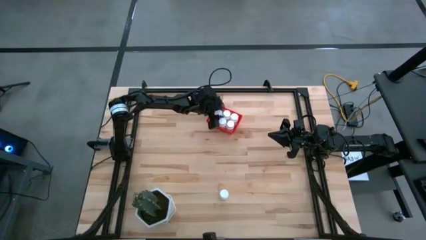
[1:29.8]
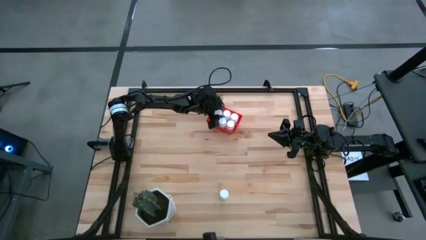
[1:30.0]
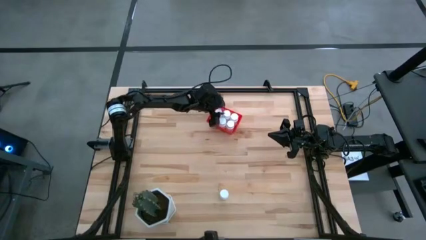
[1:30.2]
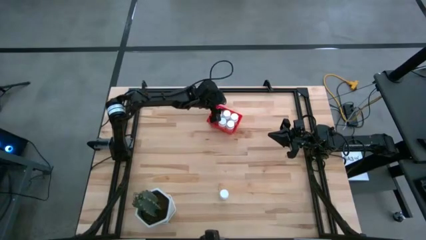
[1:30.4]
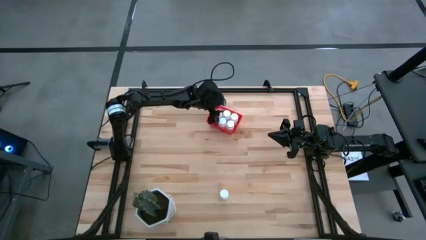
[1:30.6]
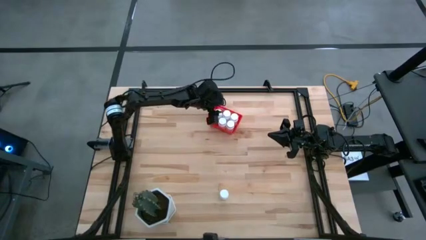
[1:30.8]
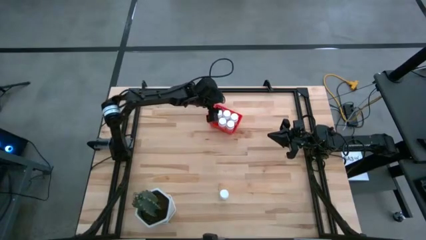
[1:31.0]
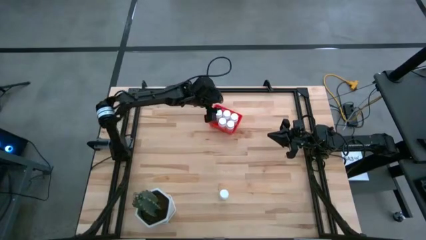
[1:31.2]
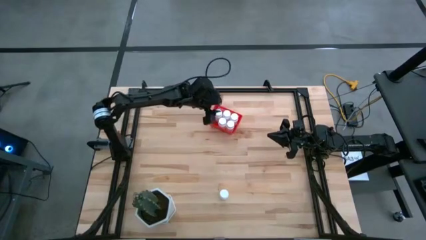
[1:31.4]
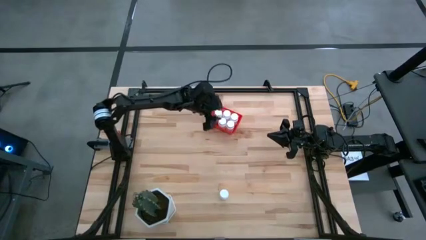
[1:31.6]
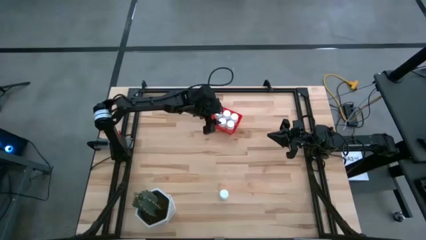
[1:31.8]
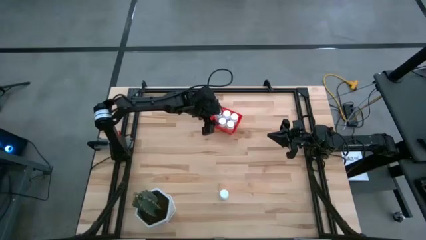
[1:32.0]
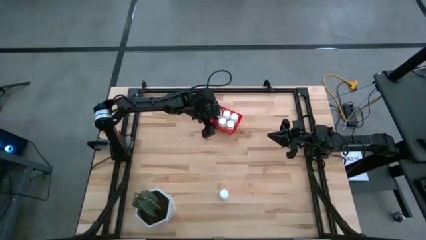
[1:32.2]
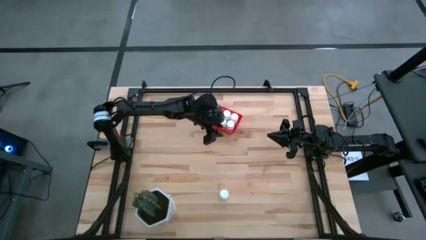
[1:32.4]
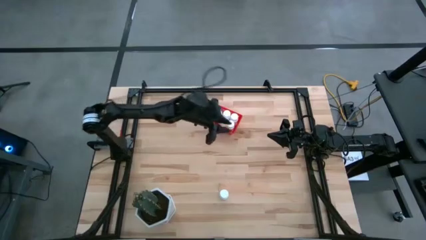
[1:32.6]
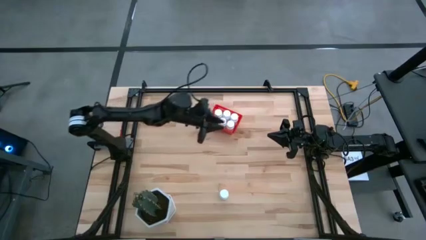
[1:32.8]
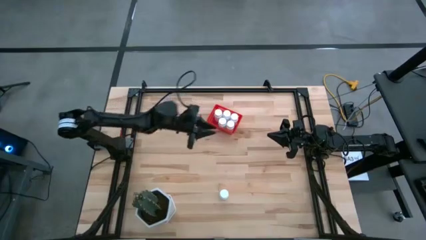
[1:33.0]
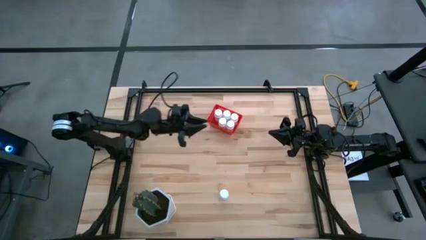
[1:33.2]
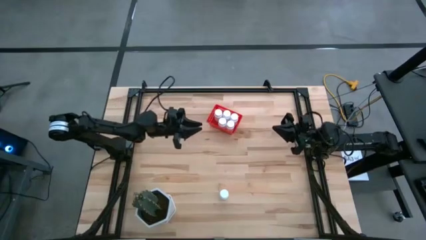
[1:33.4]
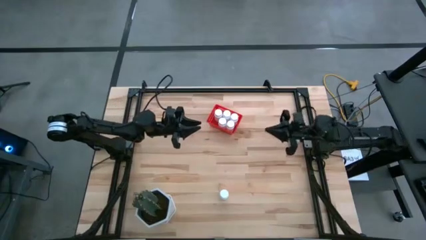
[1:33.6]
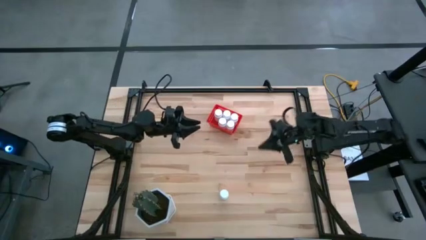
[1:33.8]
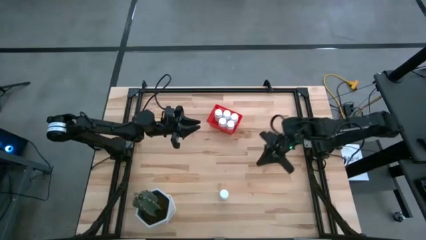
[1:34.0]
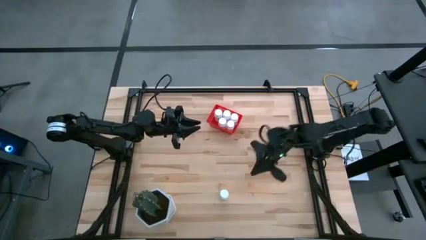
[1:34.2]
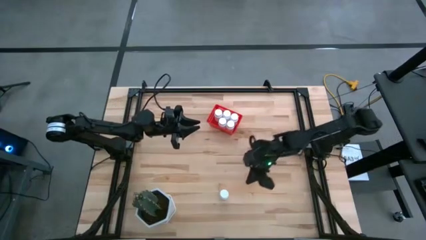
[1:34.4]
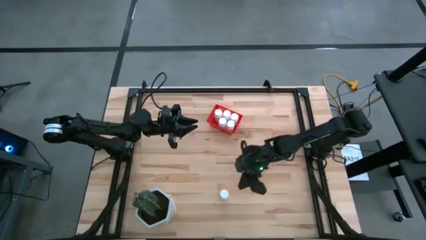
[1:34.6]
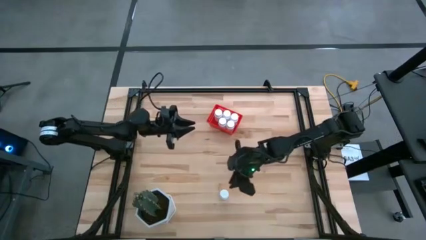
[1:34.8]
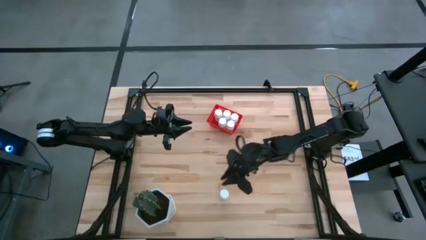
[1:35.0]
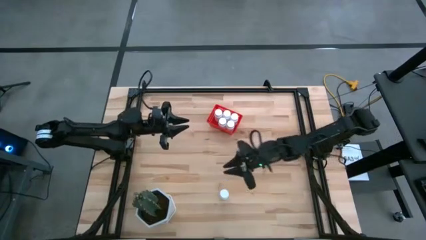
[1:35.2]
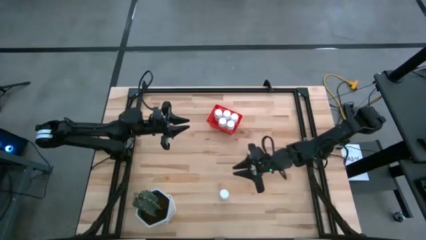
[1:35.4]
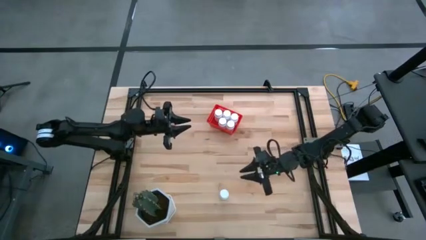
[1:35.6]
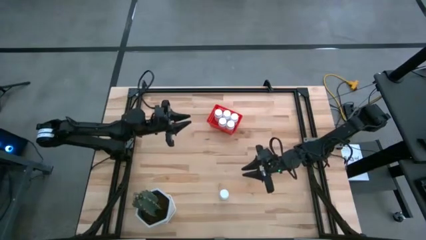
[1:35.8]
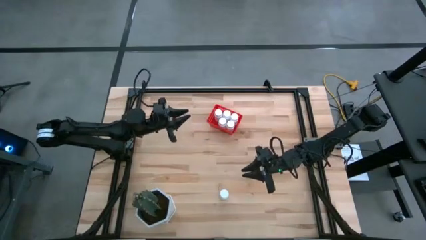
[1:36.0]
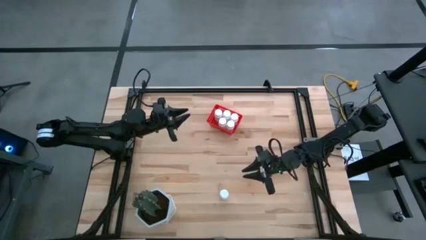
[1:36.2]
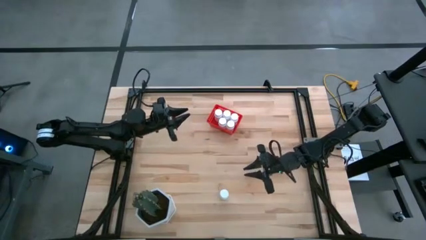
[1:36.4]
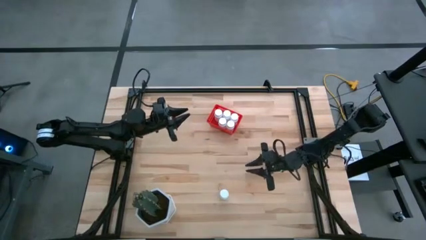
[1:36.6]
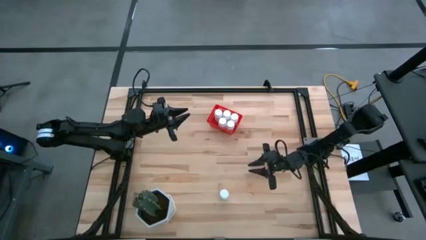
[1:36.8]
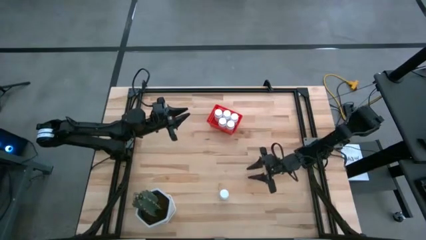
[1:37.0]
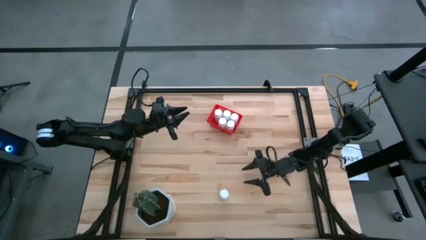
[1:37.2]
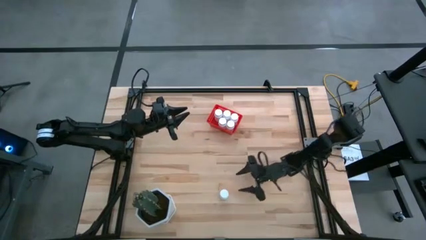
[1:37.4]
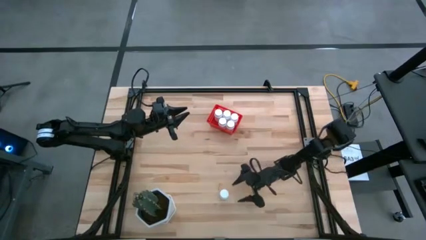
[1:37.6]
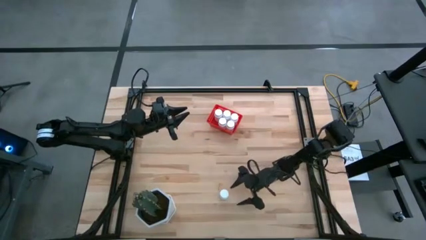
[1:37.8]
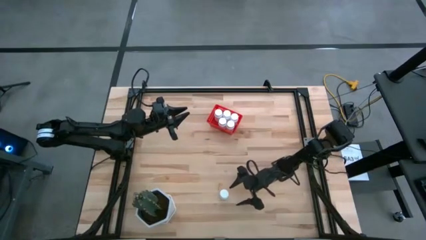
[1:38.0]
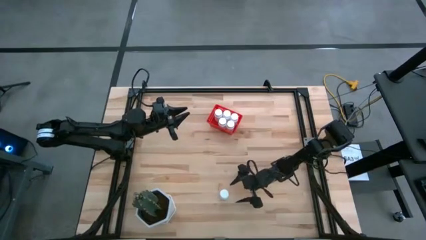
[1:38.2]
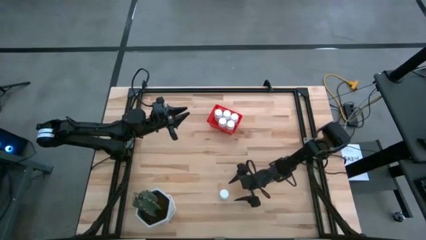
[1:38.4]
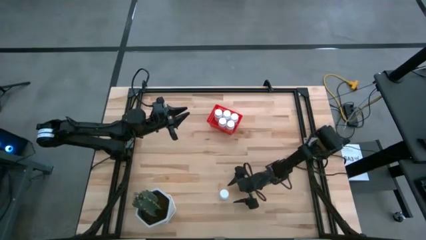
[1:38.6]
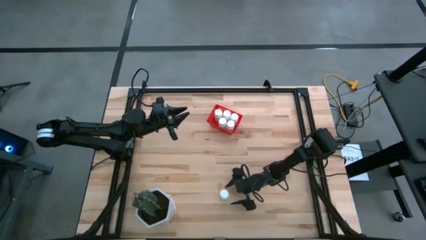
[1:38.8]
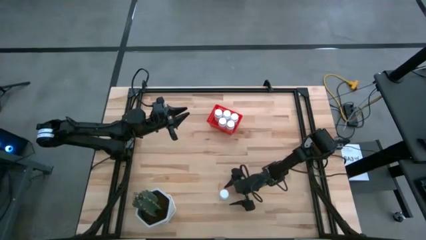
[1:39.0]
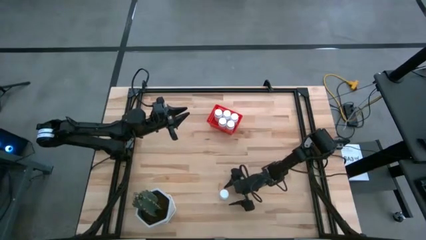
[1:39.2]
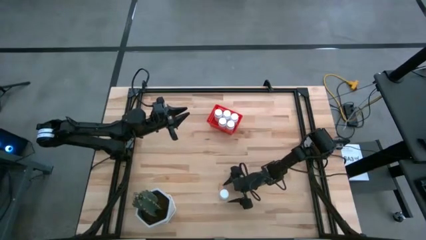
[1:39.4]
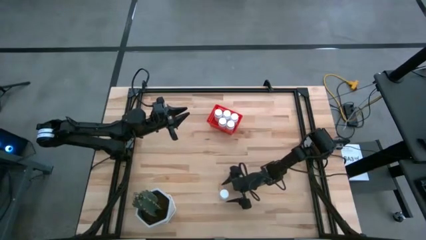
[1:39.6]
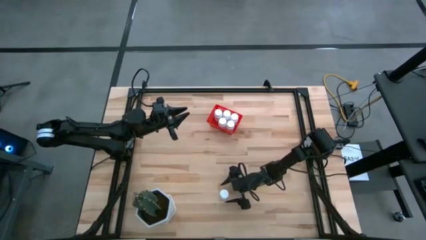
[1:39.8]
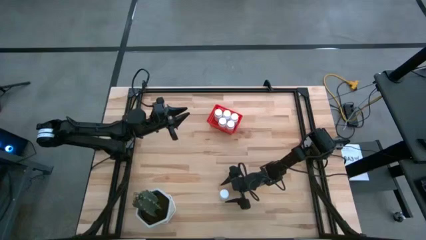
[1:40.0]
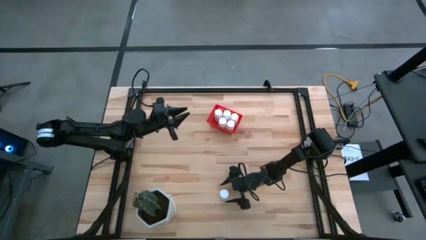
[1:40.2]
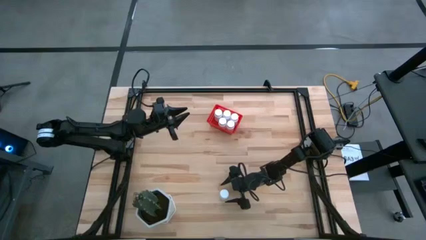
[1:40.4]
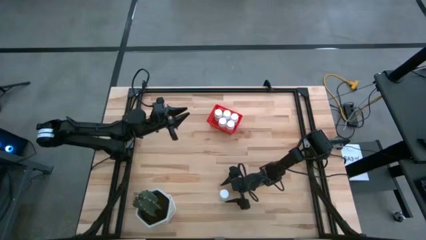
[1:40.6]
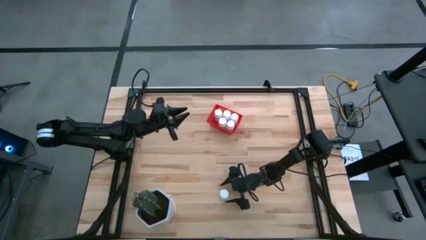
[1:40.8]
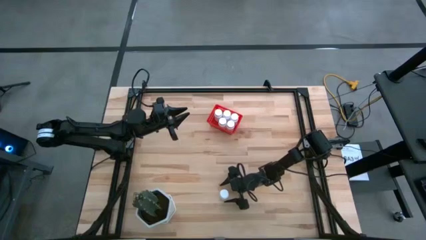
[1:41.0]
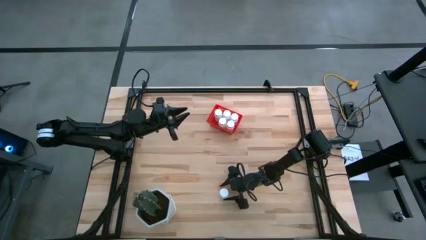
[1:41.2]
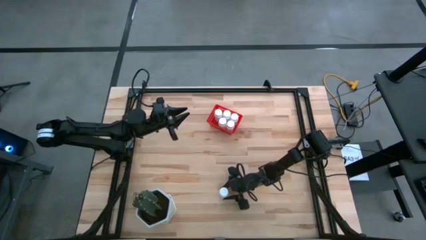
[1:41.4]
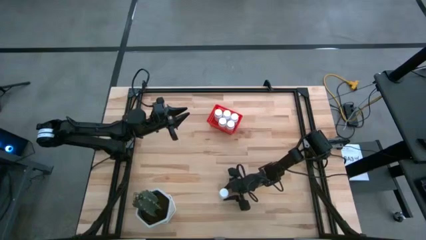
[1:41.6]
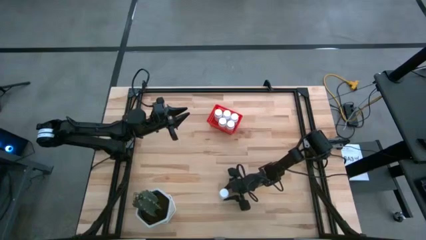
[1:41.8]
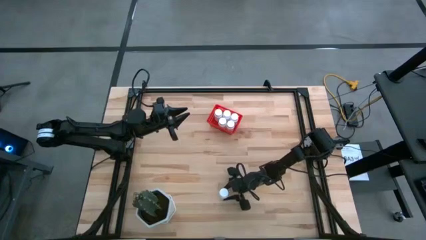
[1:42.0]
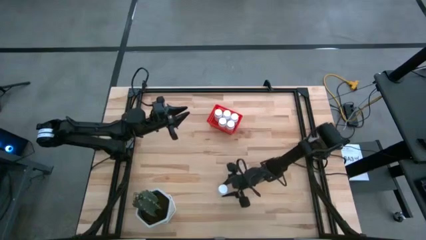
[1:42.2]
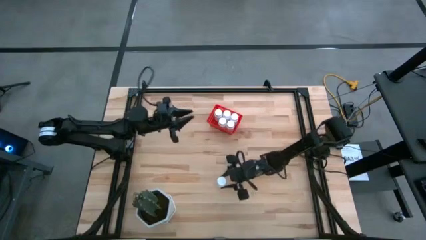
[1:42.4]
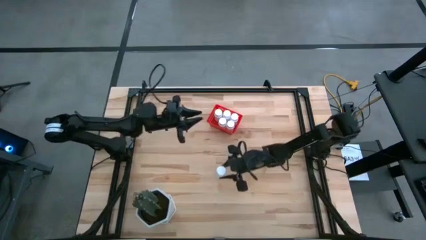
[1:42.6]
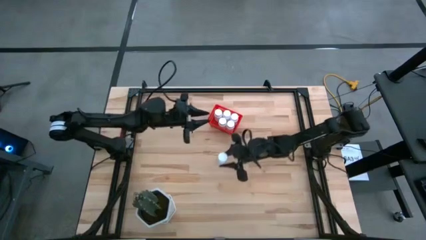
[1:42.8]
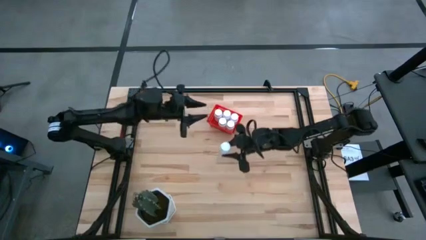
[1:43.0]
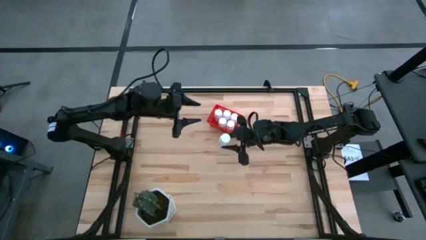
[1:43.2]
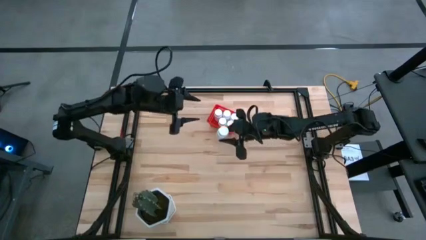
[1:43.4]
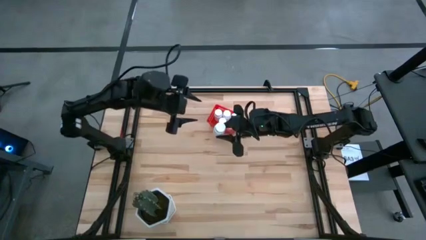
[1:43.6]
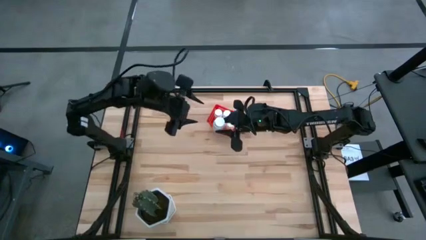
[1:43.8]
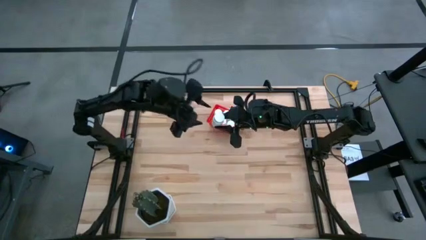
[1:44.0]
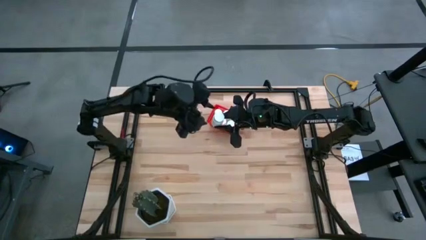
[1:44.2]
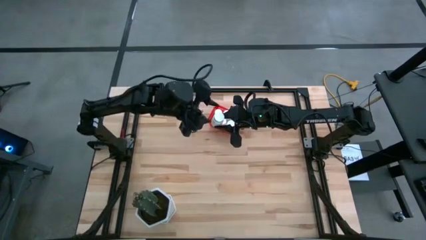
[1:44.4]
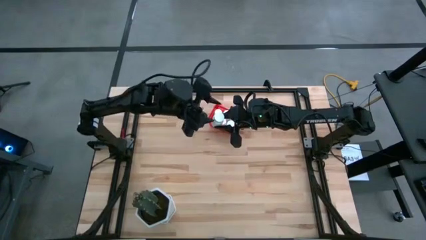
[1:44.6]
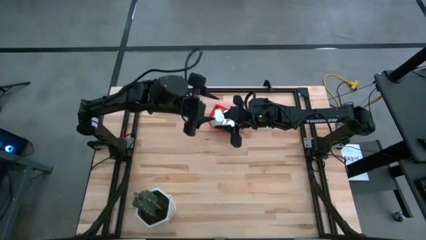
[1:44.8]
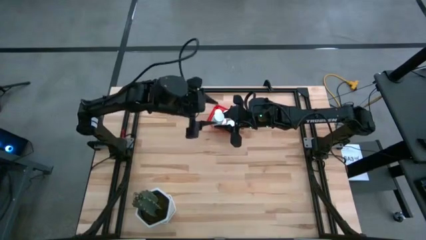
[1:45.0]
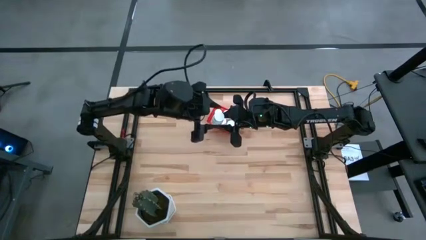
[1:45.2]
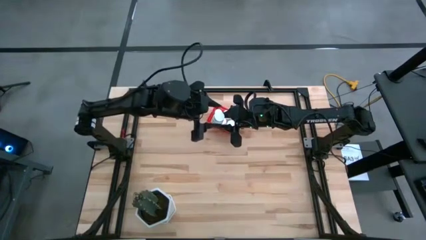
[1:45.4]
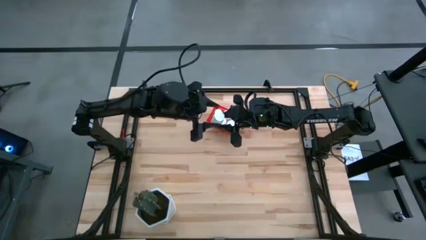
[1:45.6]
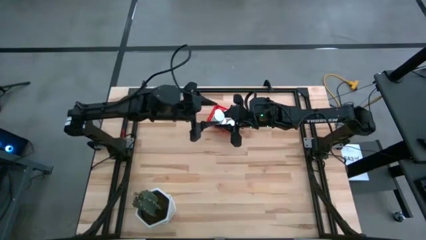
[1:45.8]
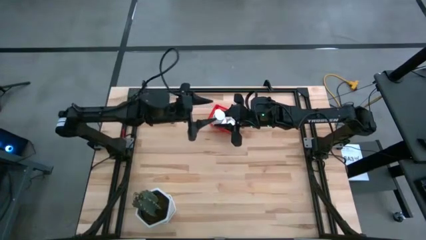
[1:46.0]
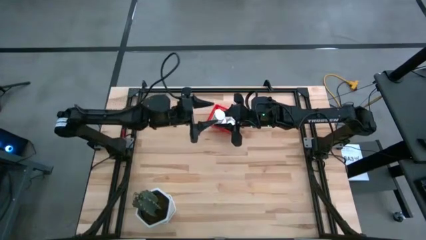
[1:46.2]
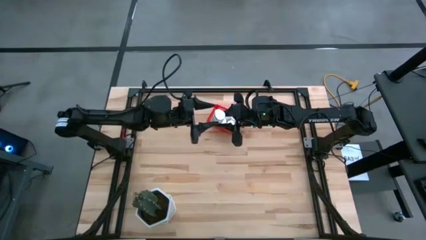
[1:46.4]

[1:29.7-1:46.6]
Task: Pick and place pill bottles into a basket
Put the white pill bottle into the red bin
